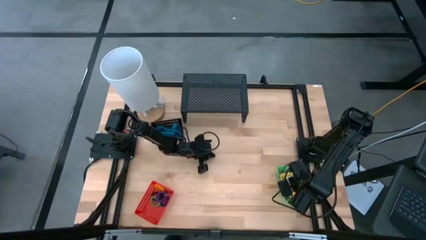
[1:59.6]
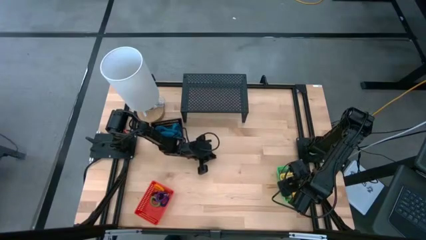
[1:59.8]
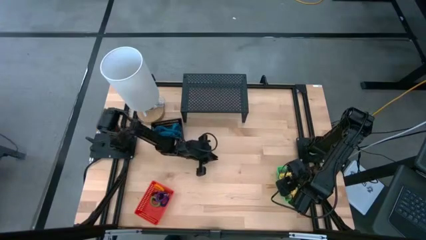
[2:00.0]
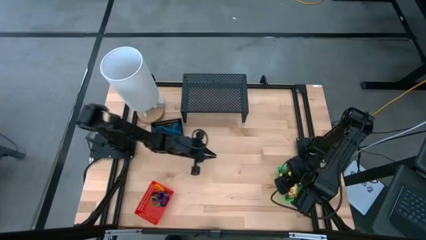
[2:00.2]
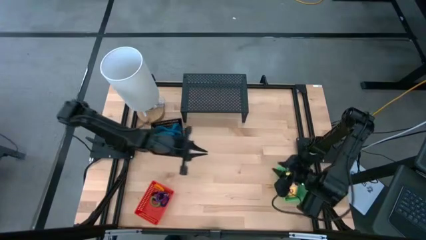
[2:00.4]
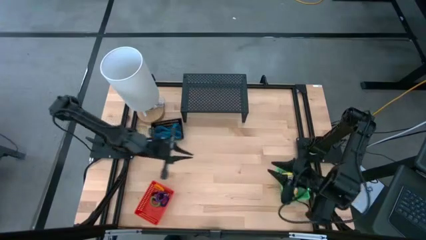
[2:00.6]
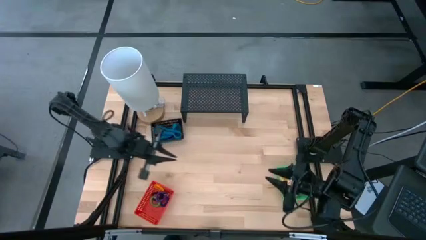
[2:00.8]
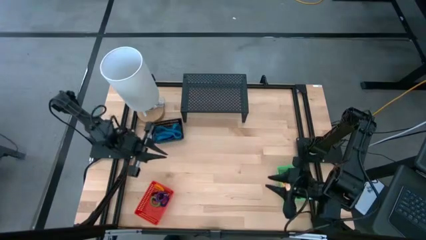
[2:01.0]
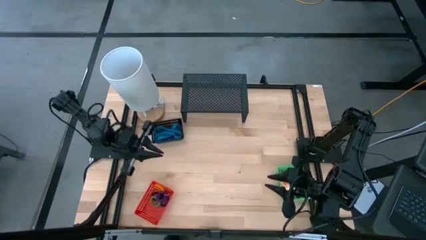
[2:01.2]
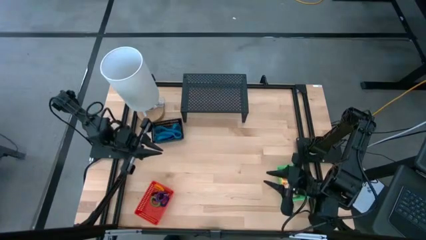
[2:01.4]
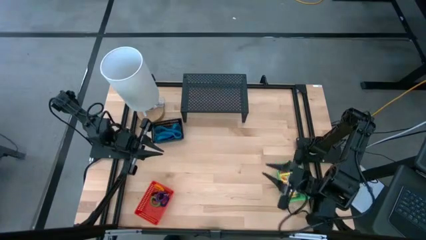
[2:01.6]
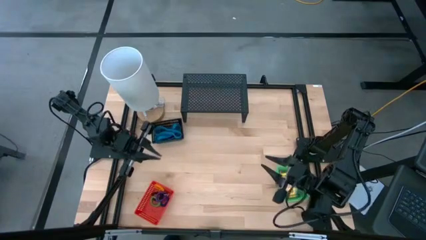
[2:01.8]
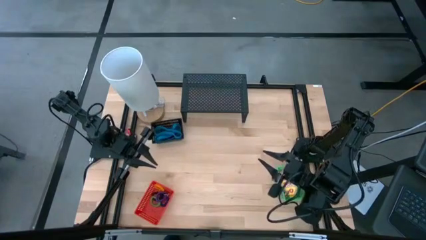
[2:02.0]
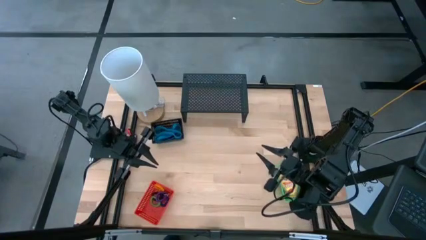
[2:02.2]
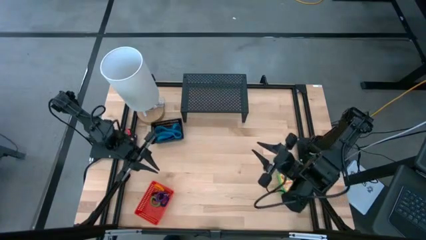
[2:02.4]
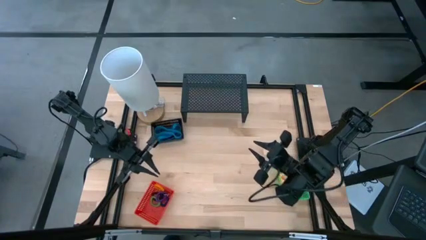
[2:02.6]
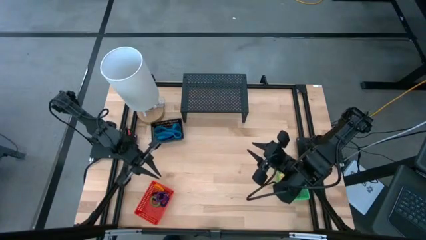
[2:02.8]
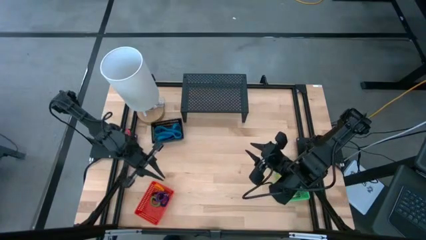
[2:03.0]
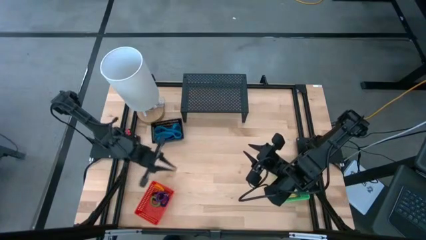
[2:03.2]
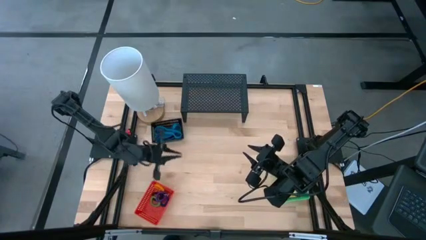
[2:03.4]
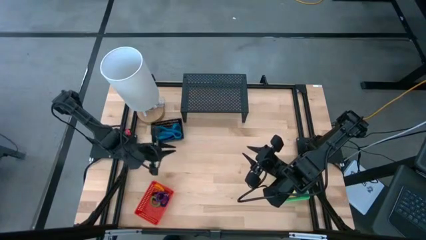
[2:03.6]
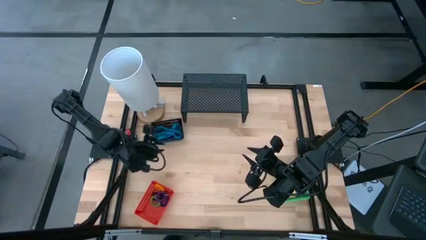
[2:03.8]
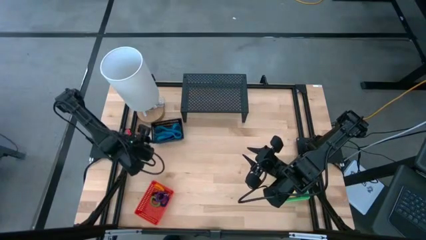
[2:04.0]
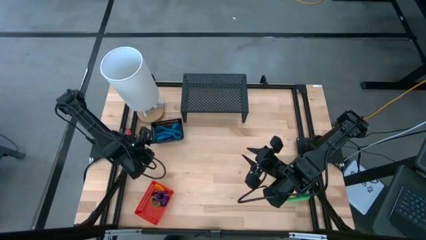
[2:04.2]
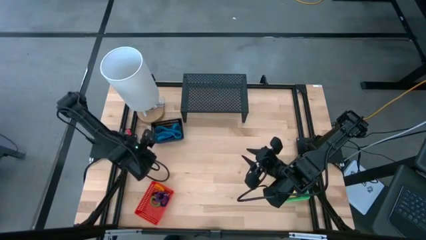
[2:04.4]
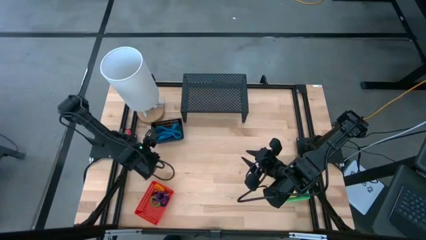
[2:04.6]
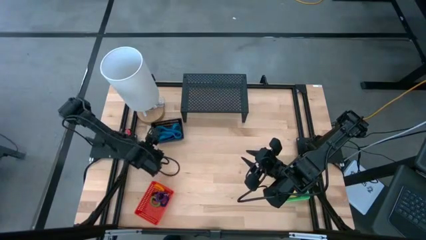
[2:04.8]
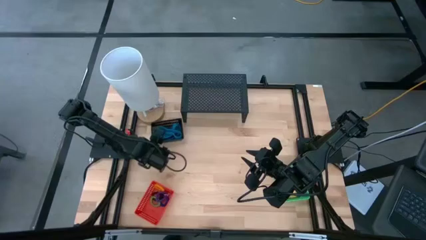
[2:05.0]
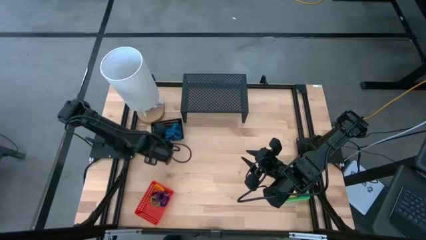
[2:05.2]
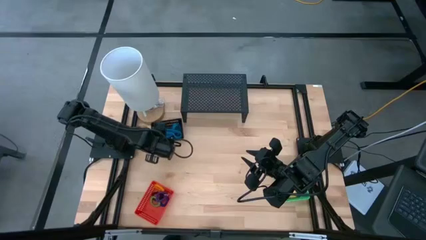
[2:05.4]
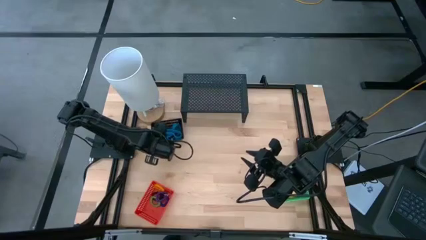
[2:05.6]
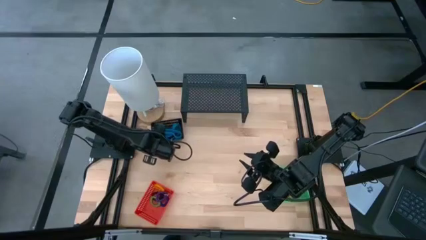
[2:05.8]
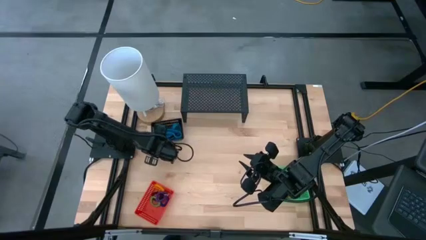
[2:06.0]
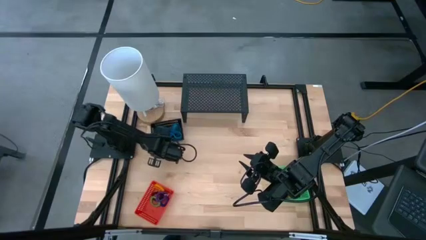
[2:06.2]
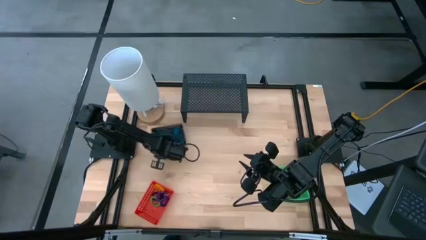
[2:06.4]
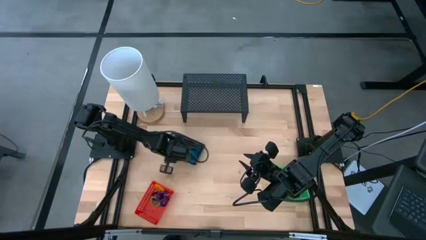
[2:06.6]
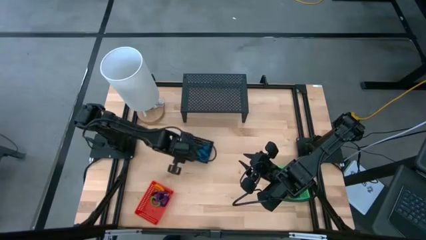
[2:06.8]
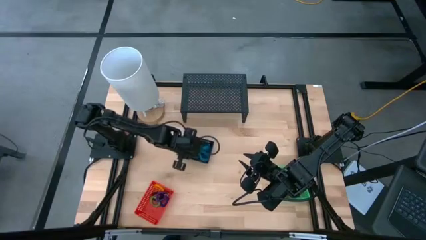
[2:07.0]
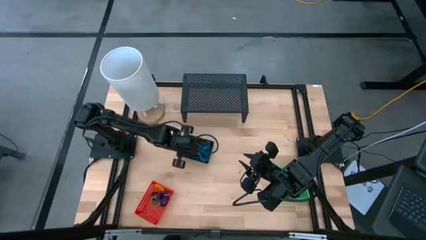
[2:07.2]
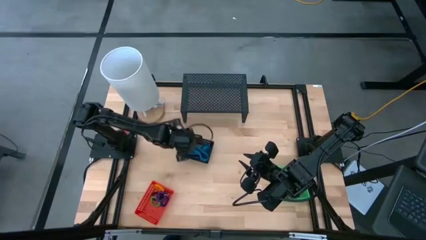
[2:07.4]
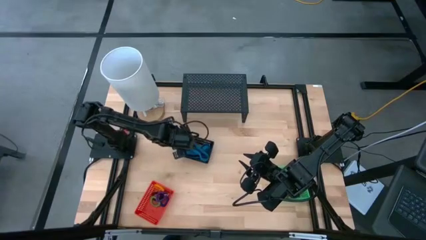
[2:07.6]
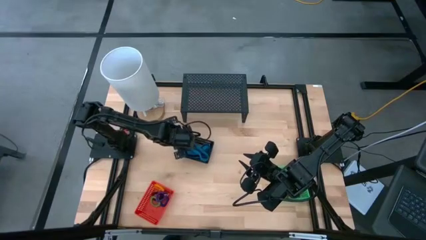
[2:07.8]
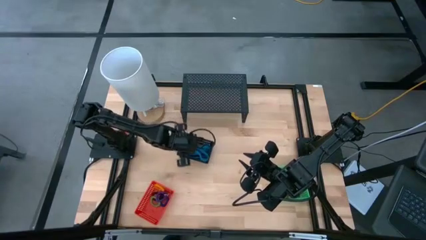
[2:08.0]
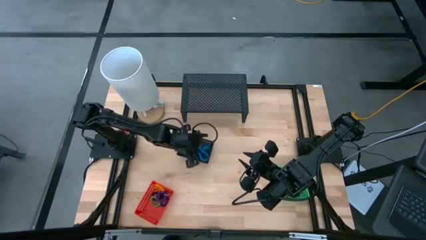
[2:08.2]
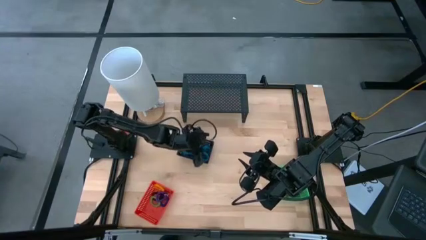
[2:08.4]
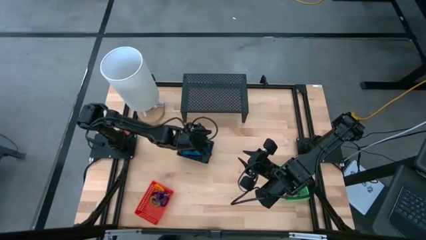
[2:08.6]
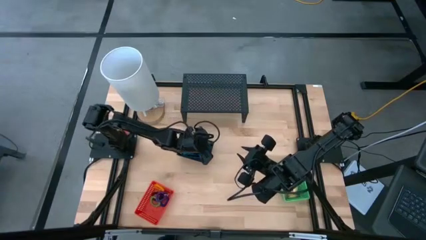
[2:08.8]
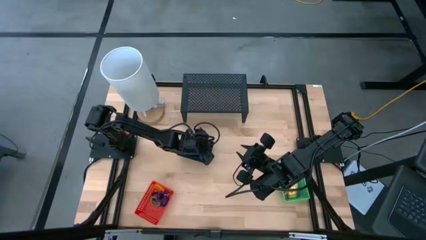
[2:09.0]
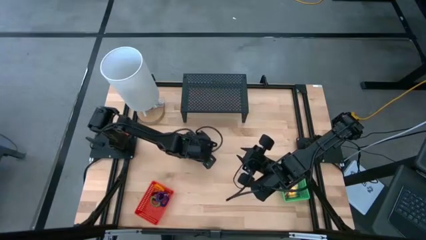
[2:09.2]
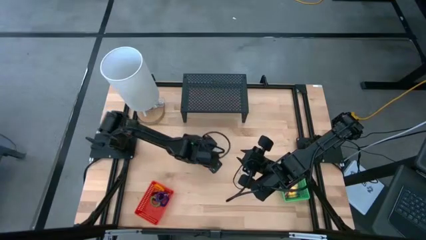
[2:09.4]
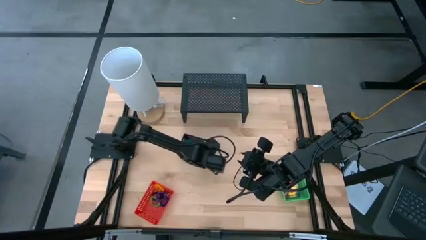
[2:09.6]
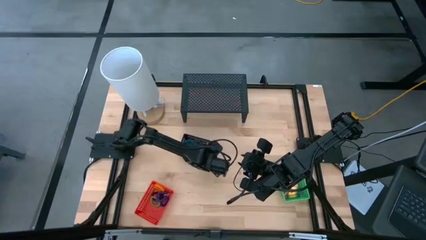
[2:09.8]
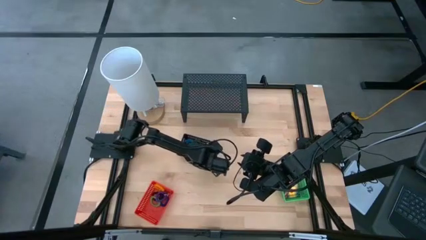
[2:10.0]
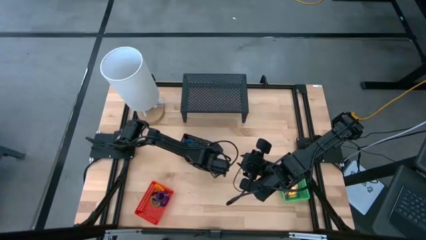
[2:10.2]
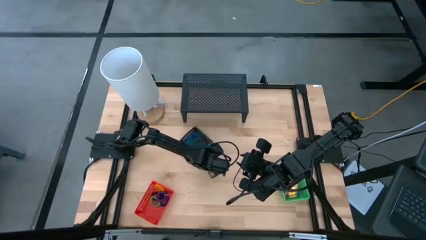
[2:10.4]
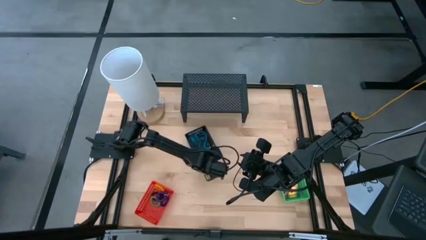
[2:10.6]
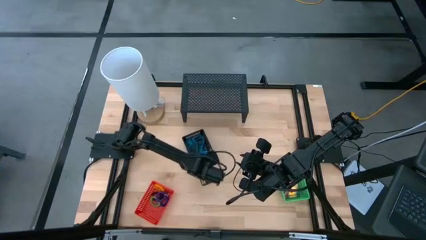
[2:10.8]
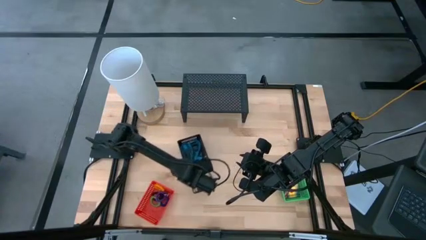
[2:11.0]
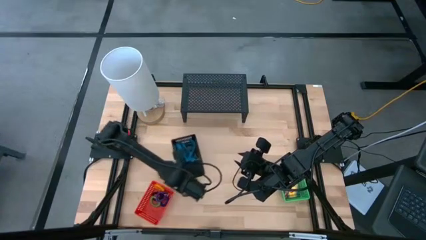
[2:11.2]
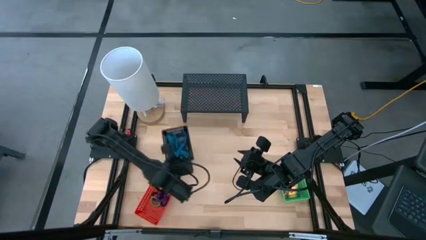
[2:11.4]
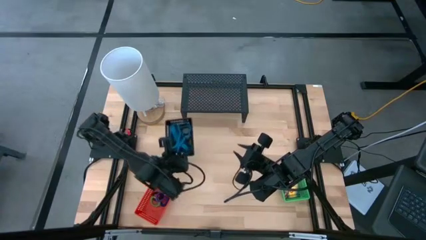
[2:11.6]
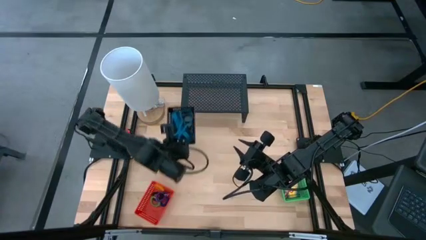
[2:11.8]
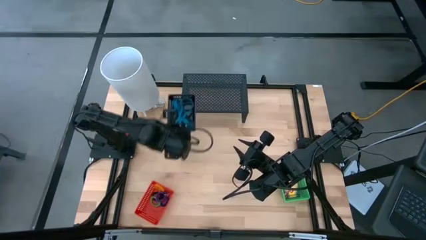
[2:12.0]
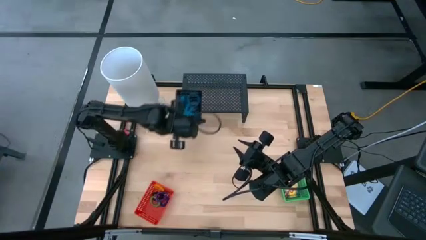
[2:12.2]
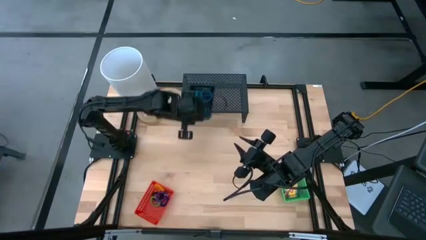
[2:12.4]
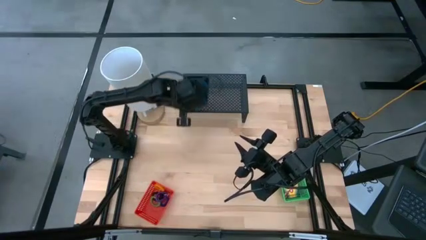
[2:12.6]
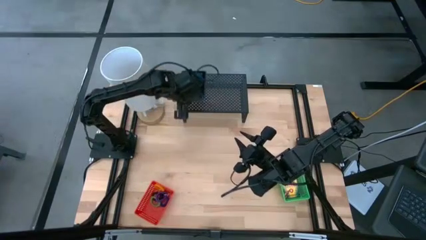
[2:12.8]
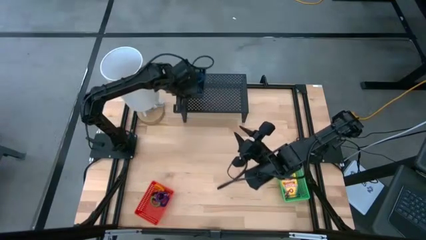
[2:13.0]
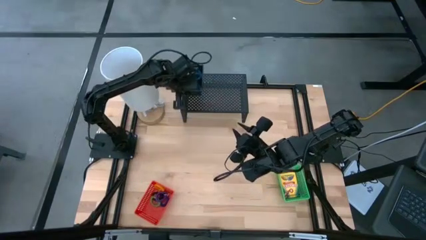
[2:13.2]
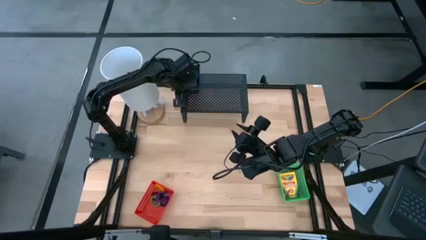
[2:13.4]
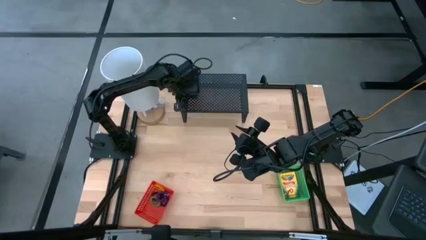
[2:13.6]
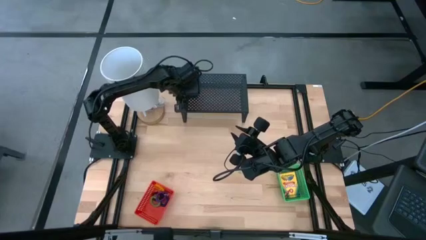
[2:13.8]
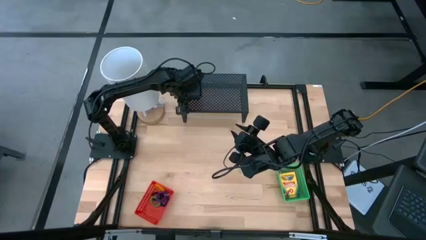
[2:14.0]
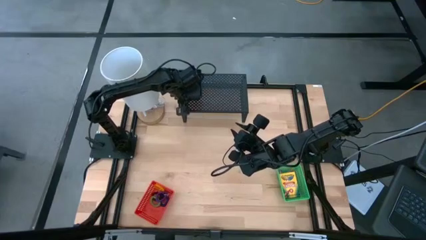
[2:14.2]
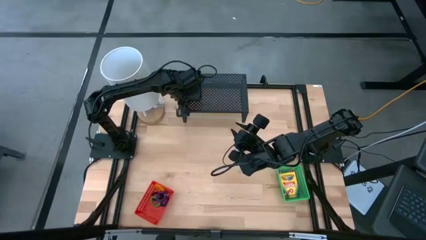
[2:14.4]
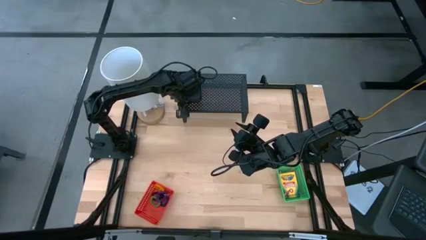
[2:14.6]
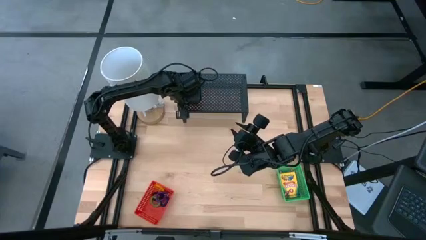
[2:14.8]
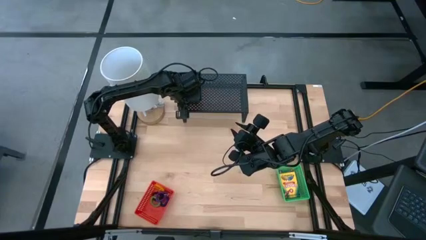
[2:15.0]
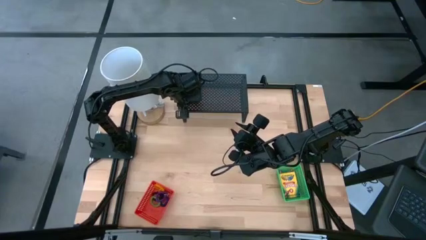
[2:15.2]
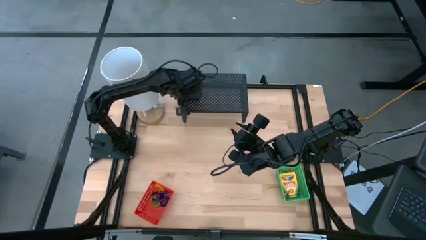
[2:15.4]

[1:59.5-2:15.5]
Task: Pick & Place Office Desk Supplies
Put the black bin filled with rubberbands on the shelf

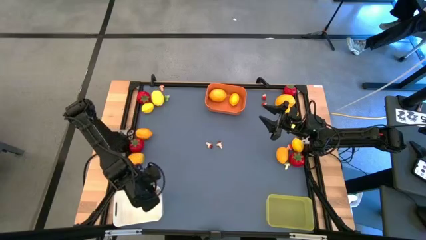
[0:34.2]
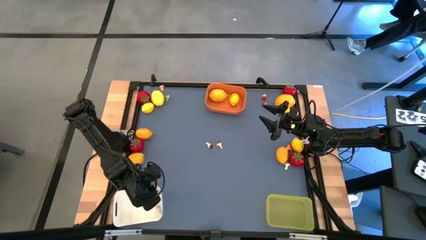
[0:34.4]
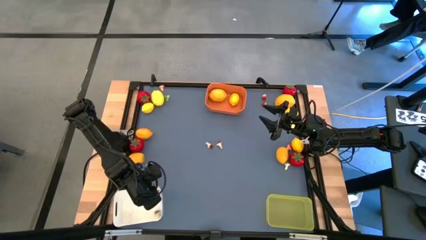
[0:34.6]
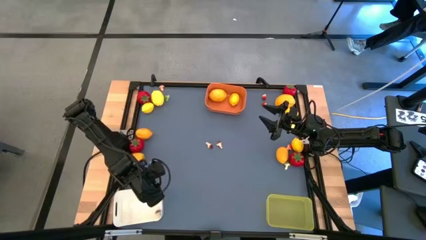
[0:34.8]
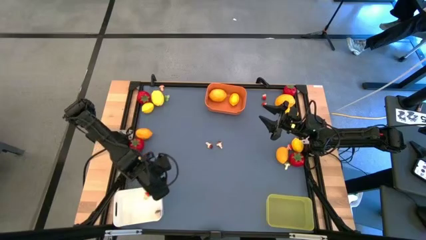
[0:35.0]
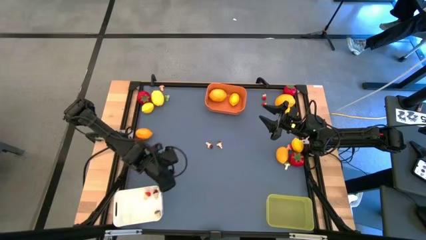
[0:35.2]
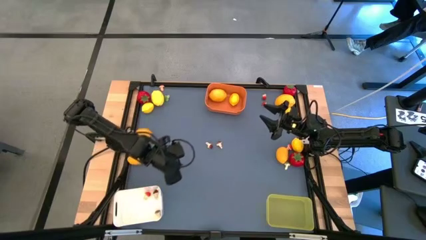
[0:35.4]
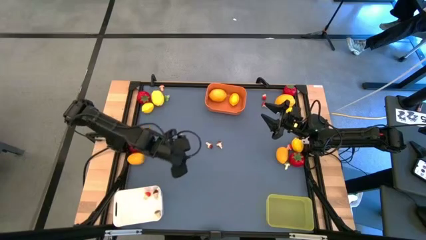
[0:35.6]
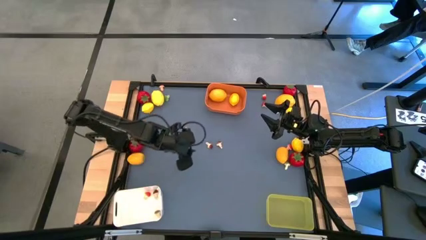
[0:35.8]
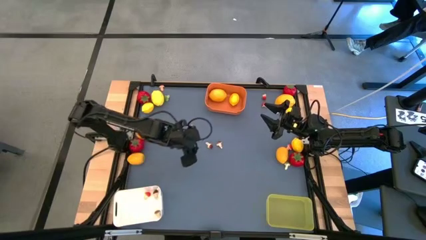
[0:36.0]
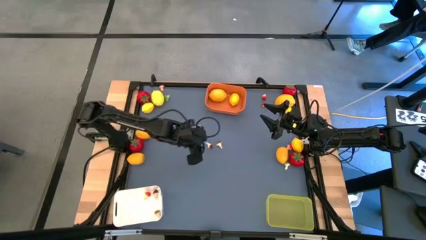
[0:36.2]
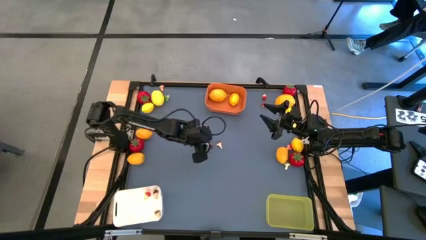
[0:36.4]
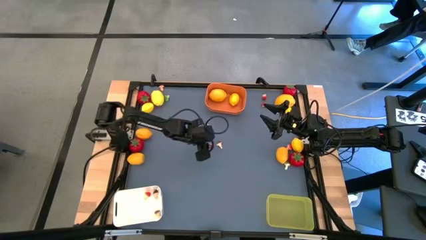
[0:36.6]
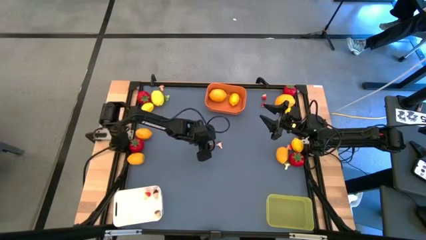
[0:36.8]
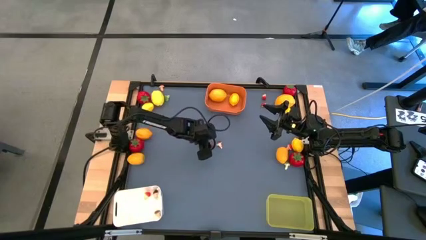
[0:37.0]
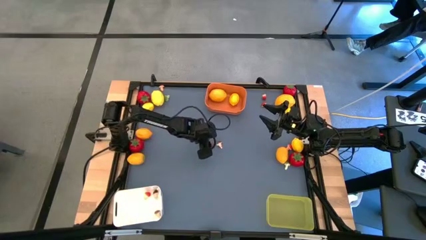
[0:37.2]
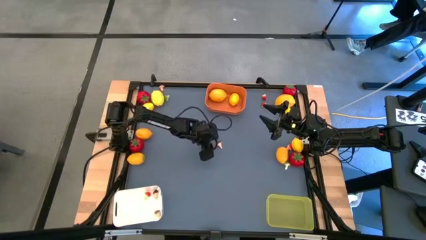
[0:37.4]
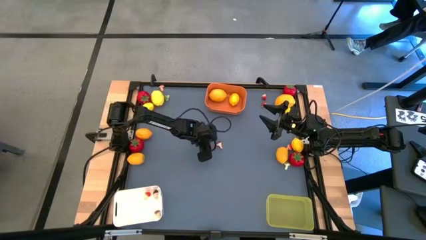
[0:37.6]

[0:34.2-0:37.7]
Task: Sort produce into baskets
Put the brown mushroom into the white bin
